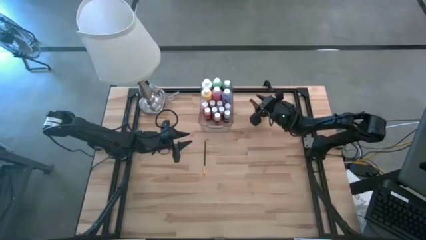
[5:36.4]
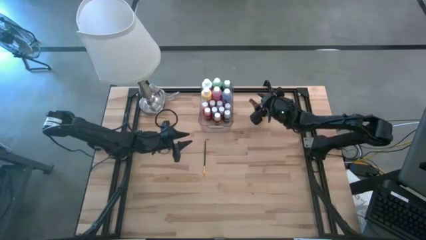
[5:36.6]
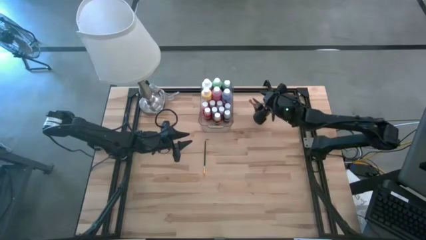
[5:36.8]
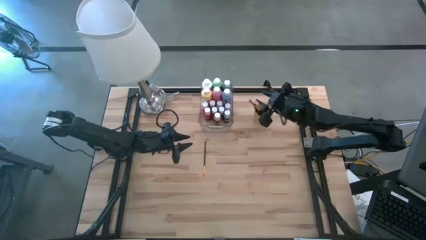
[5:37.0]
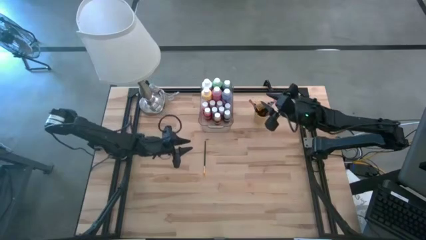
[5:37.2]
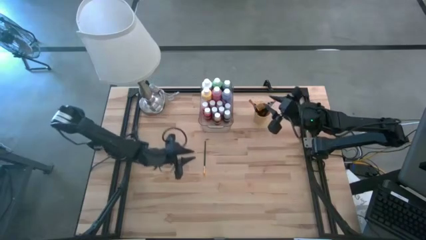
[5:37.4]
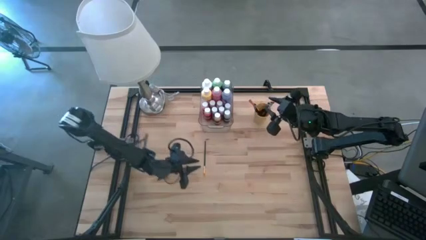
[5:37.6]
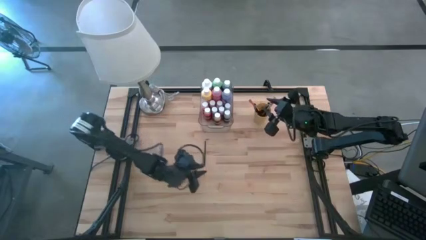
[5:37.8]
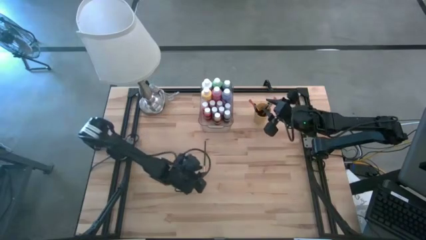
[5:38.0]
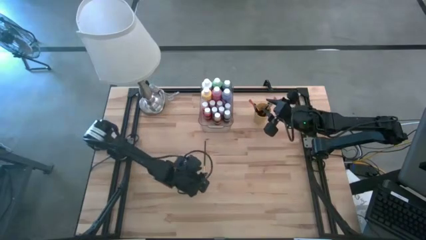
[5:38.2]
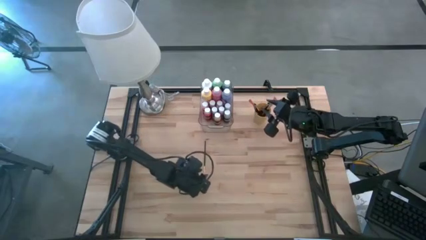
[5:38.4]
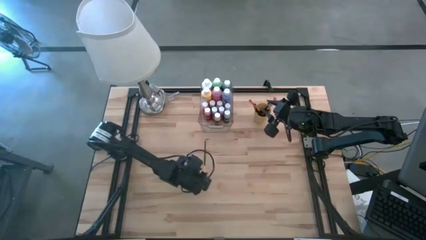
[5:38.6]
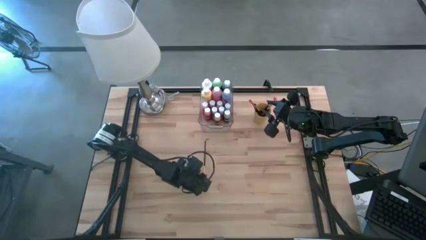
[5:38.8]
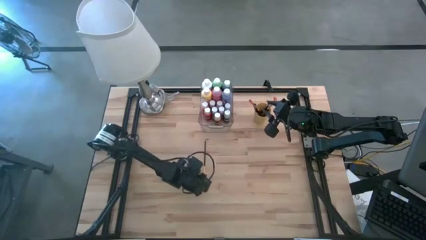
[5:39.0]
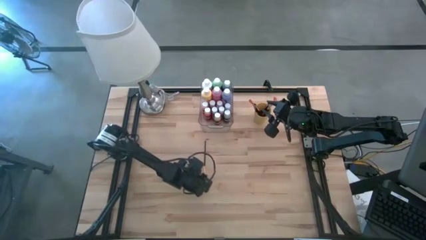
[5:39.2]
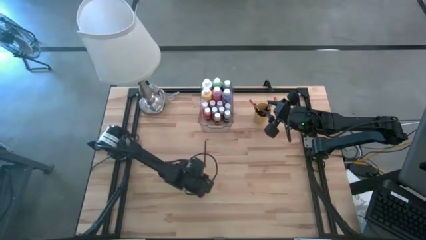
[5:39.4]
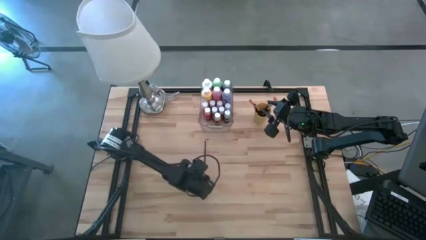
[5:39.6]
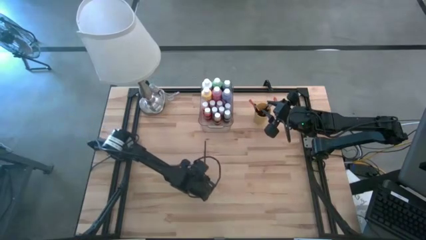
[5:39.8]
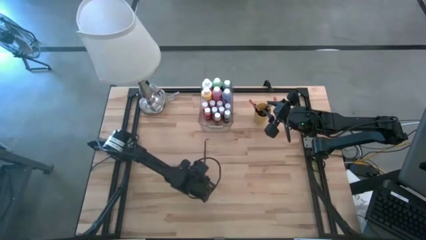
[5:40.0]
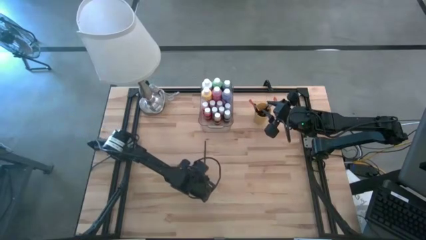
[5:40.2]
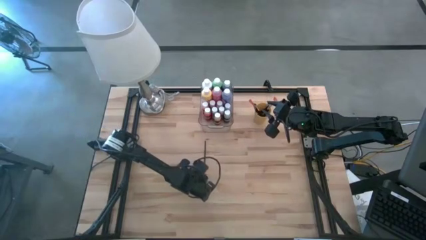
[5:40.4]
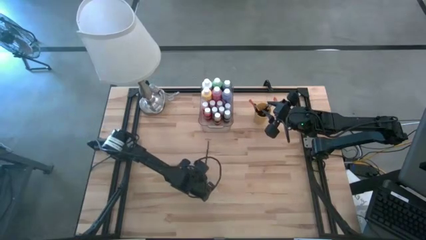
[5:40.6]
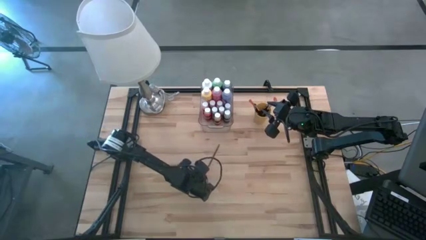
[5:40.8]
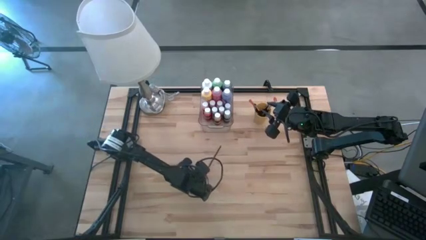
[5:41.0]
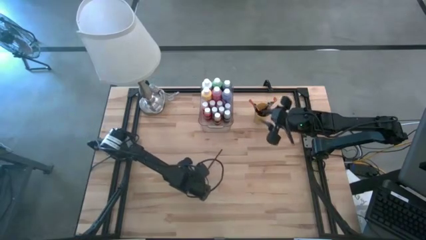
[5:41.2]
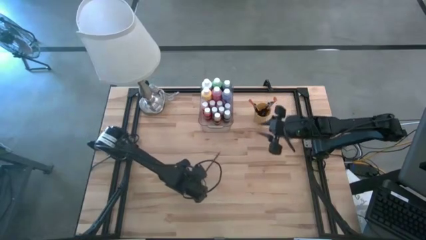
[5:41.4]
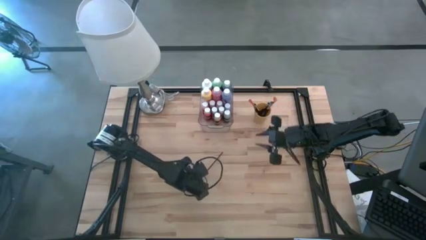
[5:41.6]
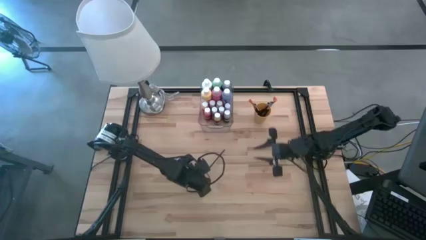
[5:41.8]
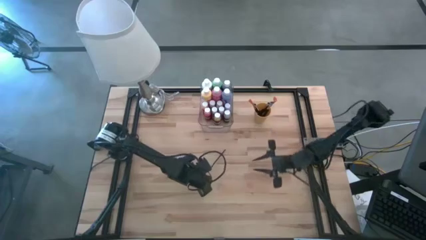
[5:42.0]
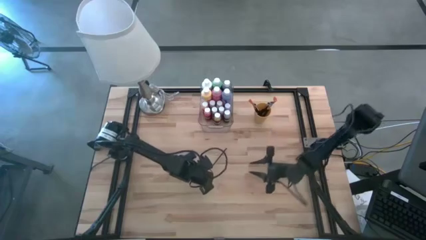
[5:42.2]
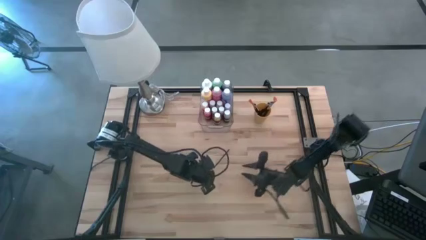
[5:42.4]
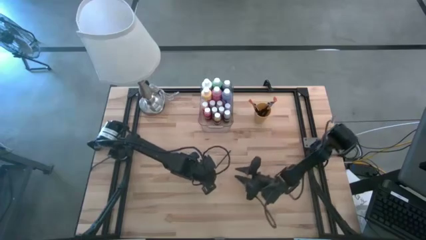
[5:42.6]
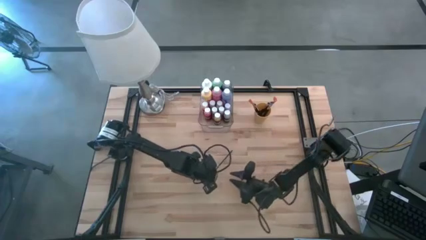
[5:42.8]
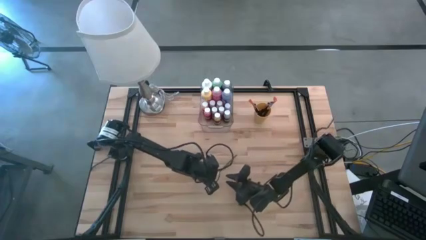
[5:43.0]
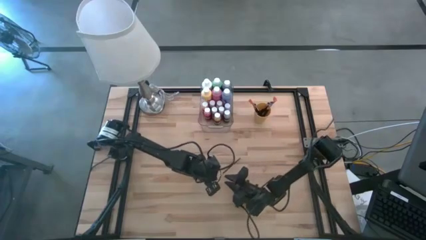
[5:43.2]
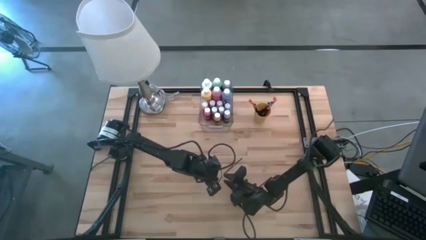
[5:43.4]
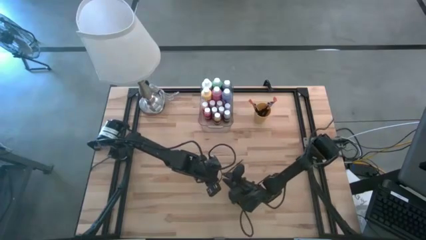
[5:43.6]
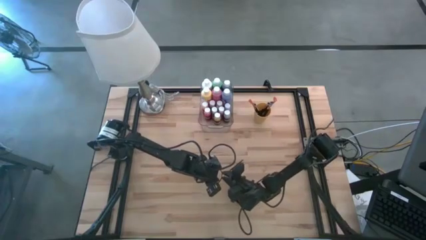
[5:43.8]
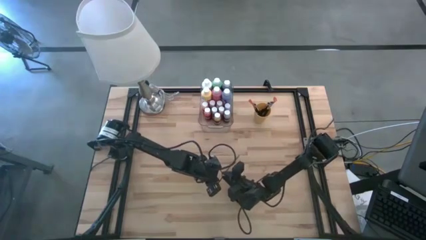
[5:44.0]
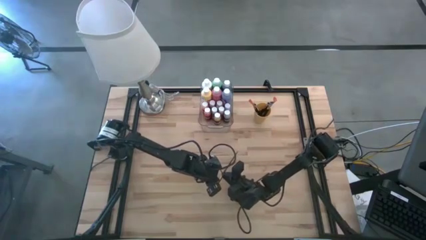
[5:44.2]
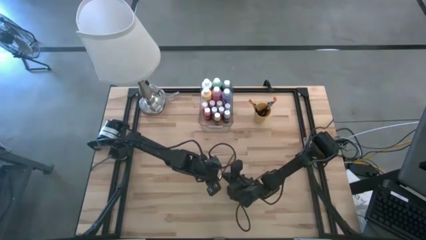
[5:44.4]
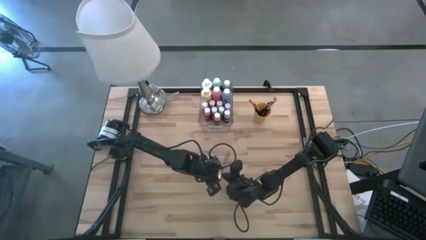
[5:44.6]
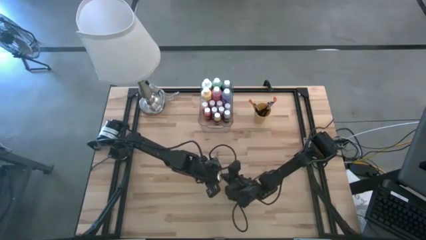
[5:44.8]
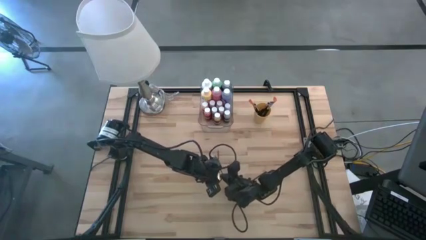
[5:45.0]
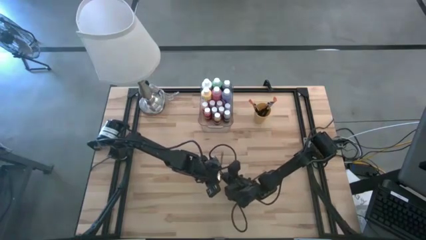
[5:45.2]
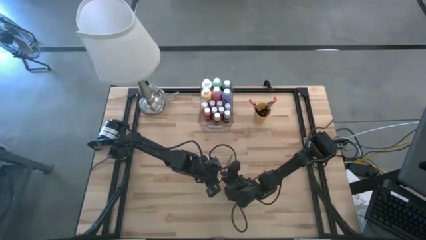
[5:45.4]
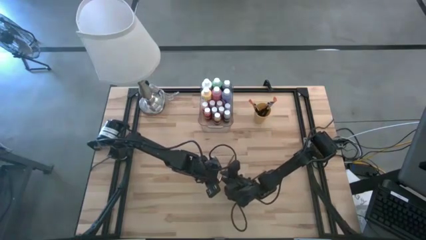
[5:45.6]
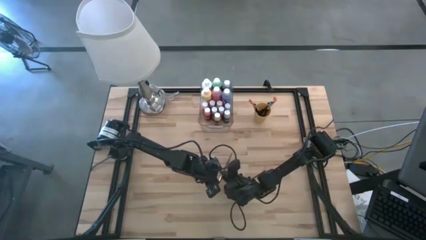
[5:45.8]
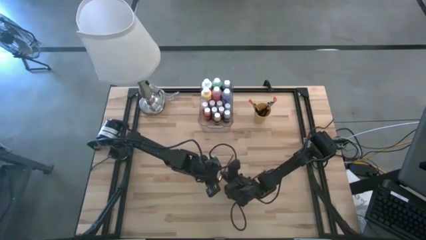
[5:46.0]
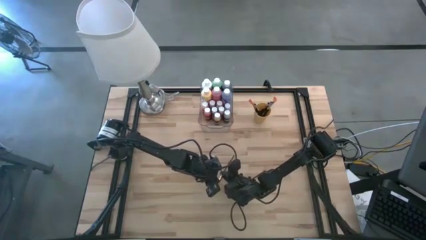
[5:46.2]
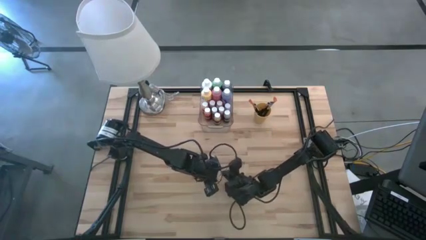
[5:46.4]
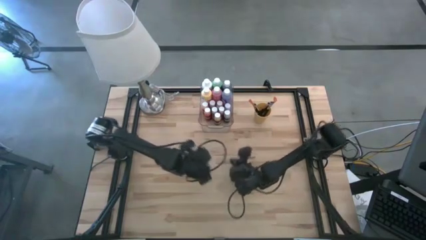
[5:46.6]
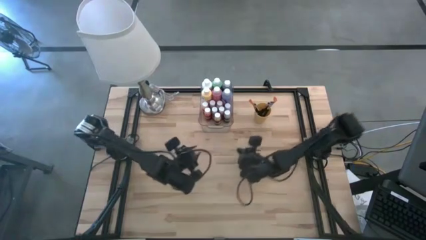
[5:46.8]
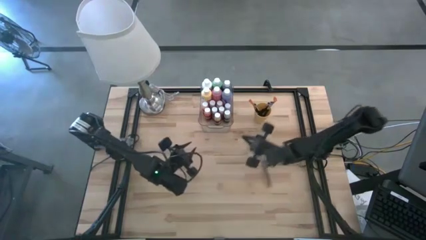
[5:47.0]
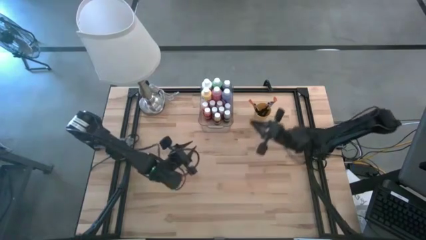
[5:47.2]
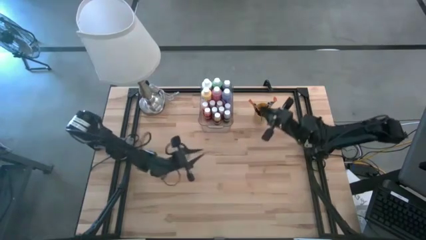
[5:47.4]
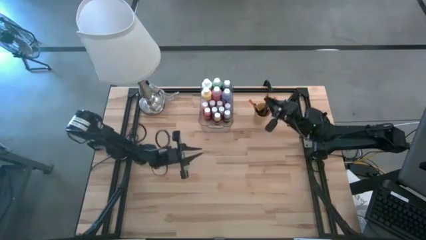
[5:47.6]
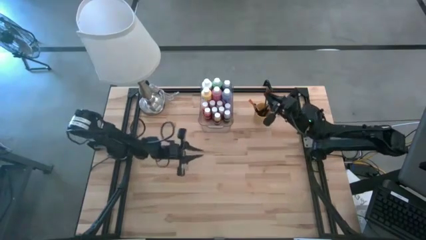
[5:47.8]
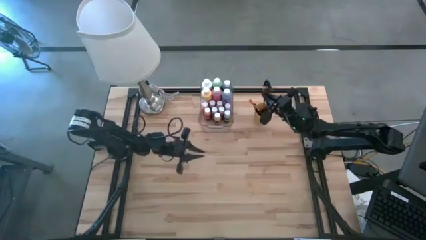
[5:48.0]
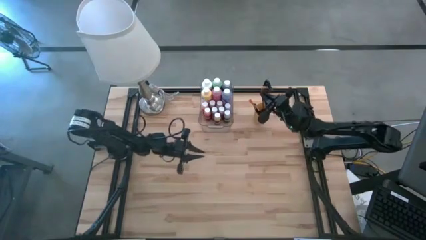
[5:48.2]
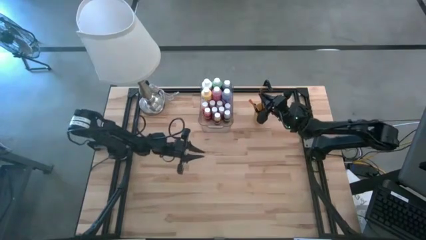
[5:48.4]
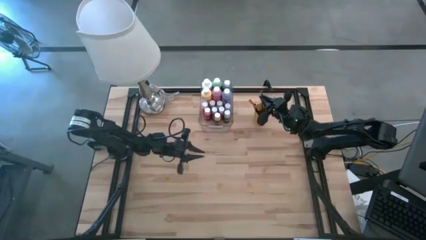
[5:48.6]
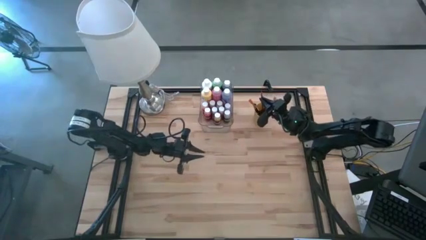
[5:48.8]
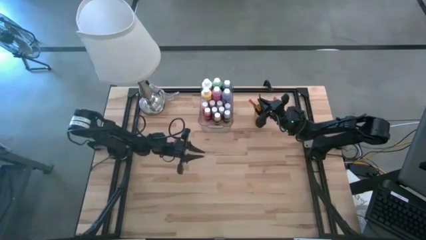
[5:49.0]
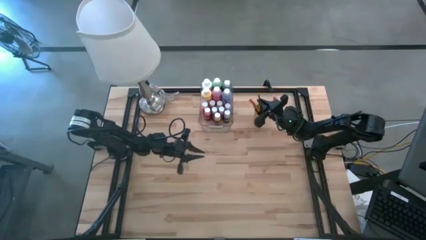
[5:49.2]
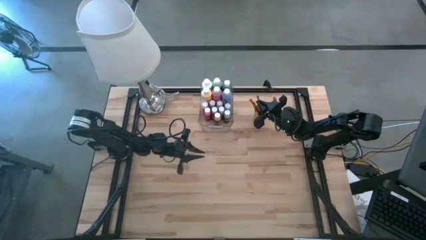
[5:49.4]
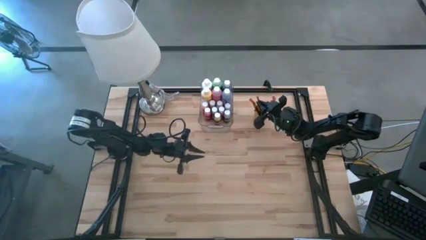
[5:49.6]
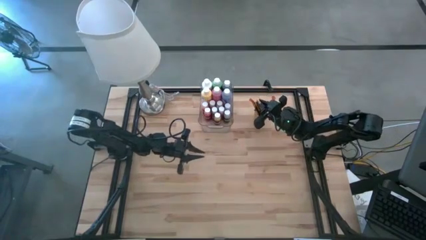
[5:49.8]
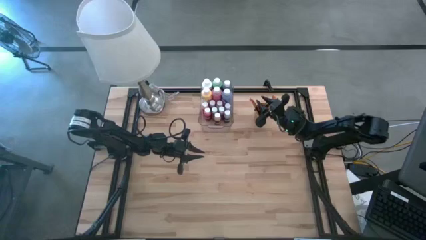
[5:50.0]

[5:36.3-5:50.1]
Task: Pick & Place Paint Supplies
Put the gold paint brush into the cup

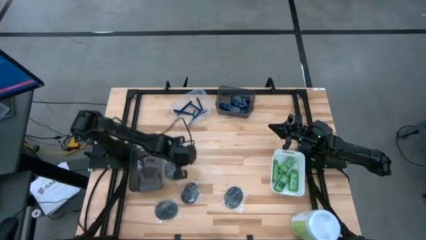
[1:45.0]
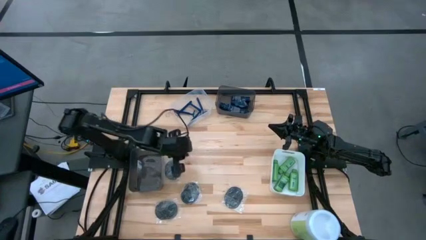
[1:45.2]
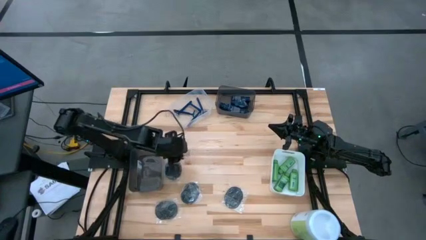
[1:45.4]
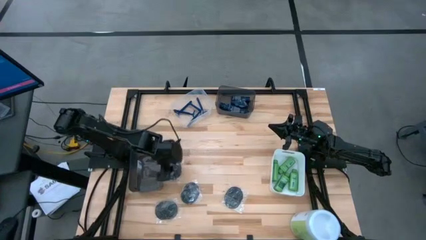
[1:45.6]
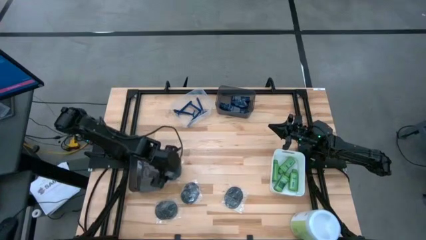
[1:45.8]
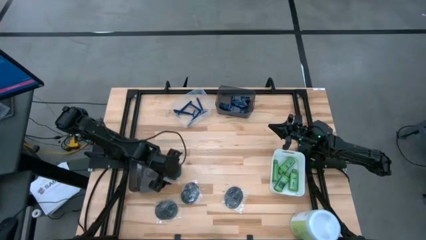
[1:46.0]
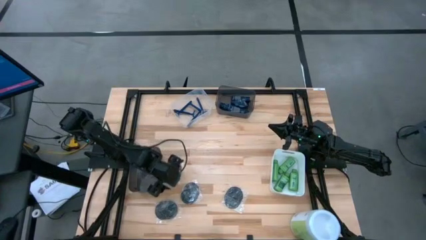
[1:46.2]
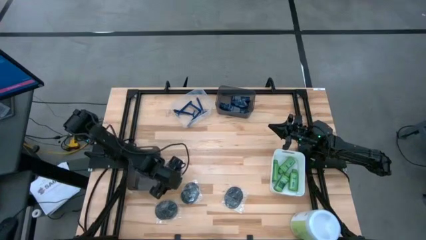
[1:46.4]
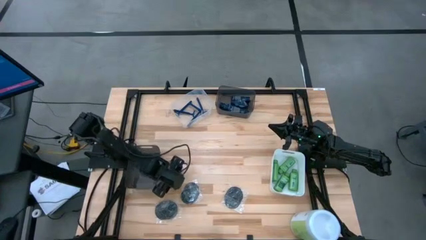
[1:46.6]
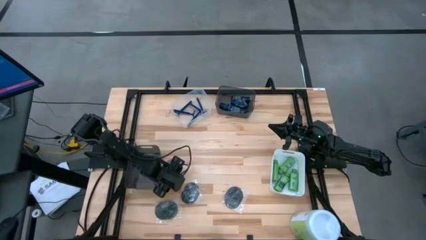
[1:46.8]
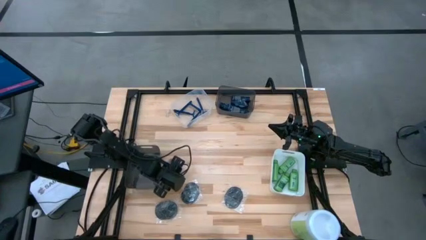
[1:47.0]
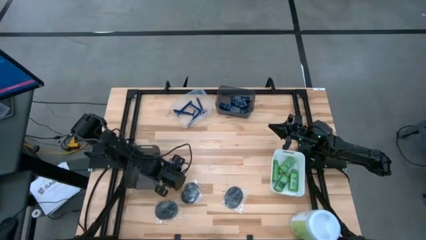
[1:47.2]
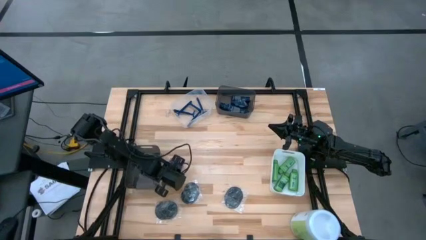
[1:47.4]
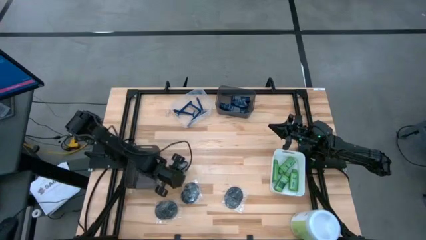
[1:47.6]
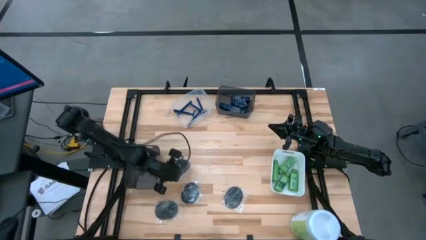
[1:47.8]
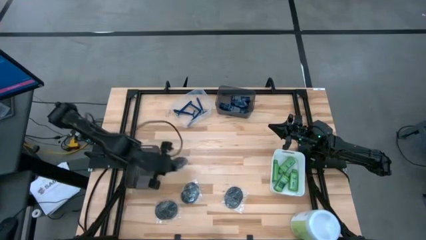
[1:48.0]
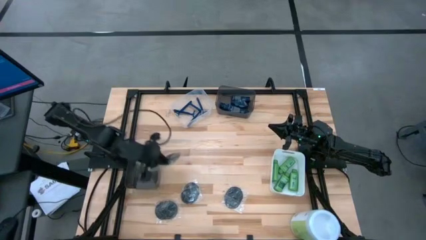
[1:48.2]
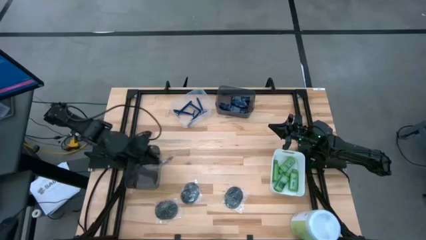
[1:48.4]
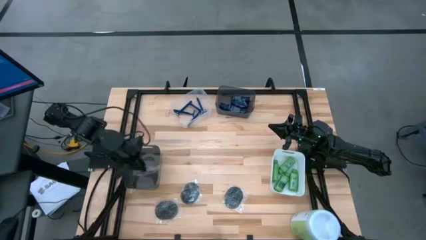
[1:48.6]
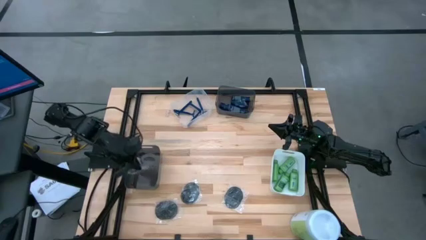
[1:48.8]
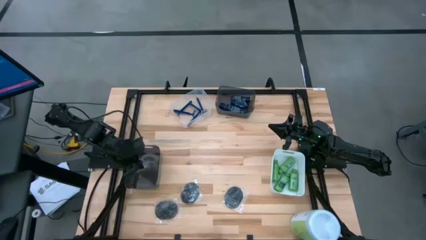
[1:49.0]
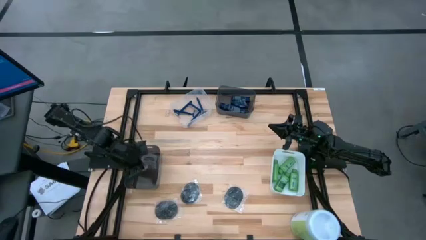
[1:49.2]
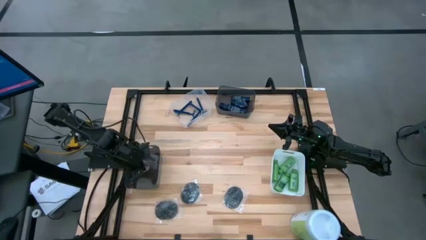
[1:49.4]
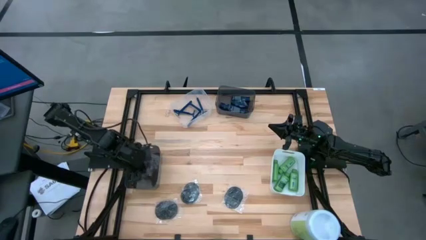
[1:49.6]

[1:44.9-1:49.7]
Task: Pick & Place Travel size toiletries
Put the black hairbrush into the bottom black bin
